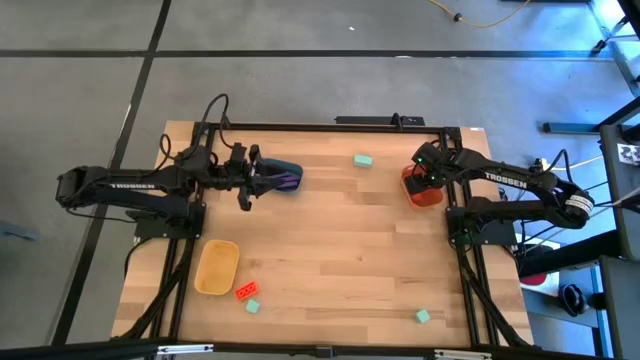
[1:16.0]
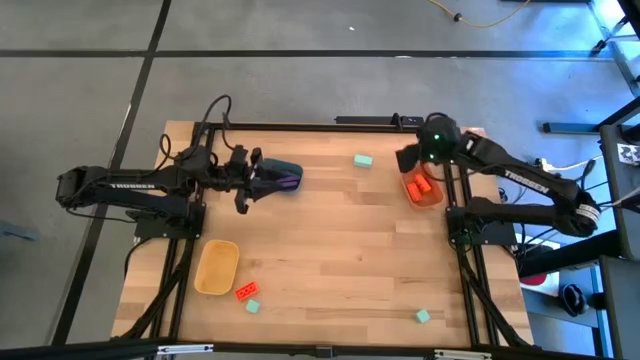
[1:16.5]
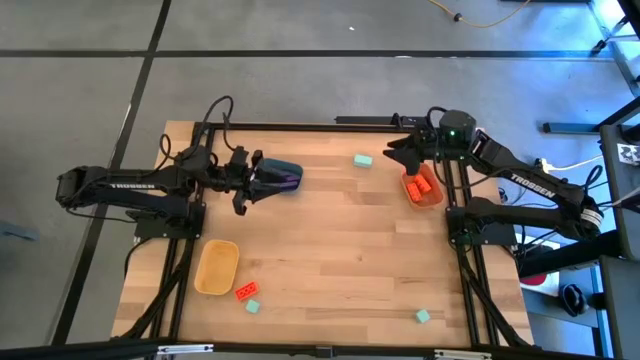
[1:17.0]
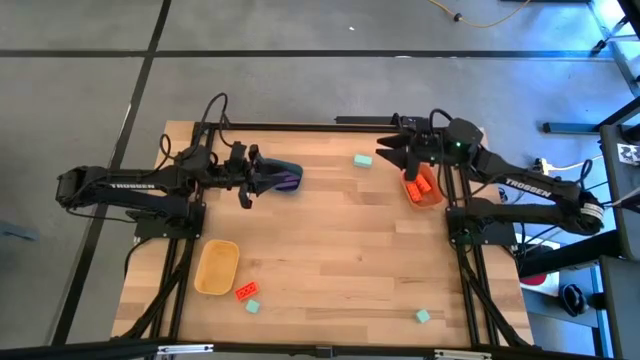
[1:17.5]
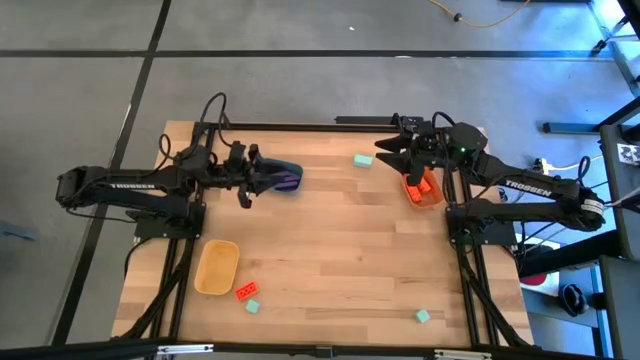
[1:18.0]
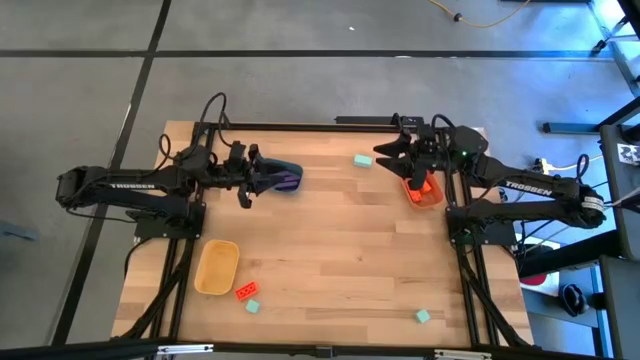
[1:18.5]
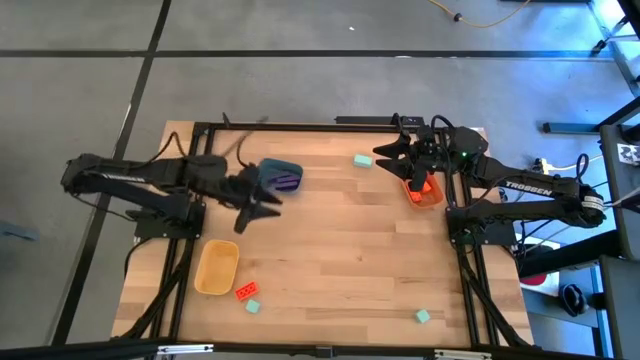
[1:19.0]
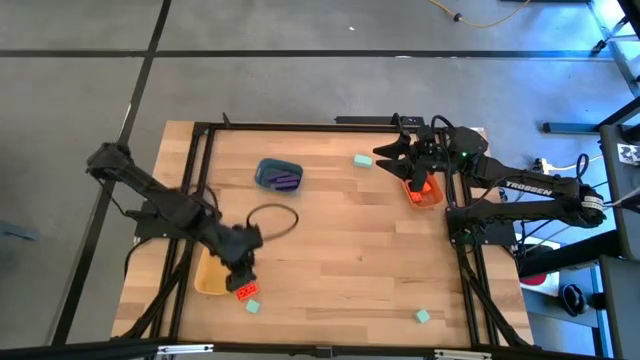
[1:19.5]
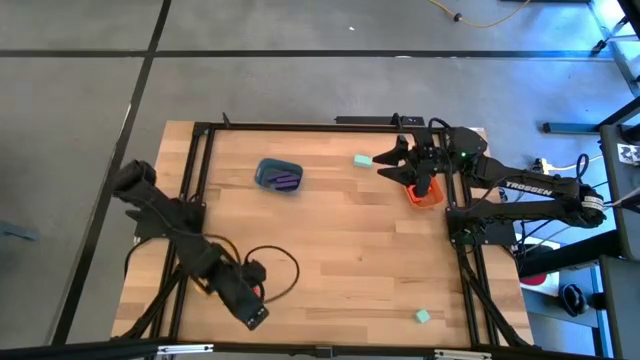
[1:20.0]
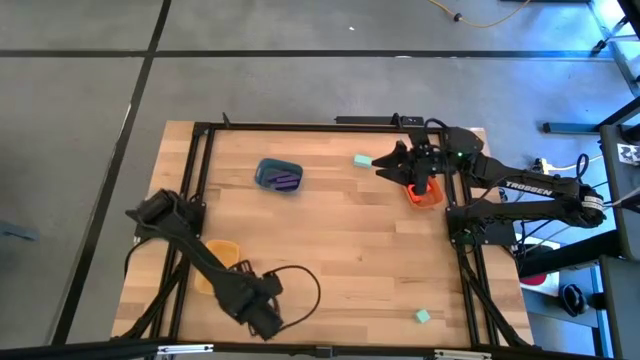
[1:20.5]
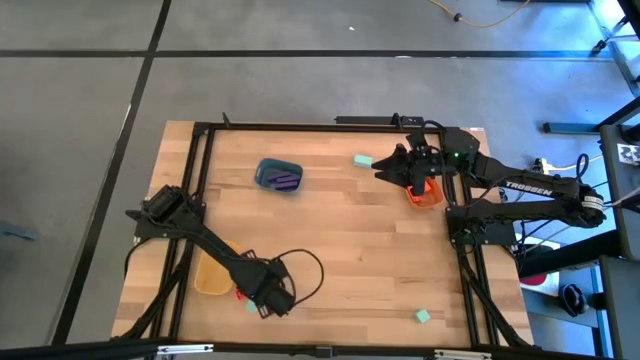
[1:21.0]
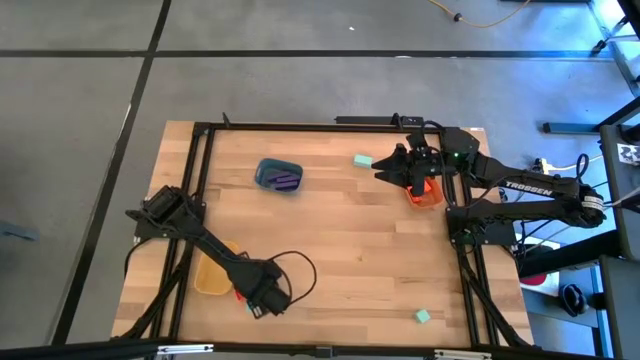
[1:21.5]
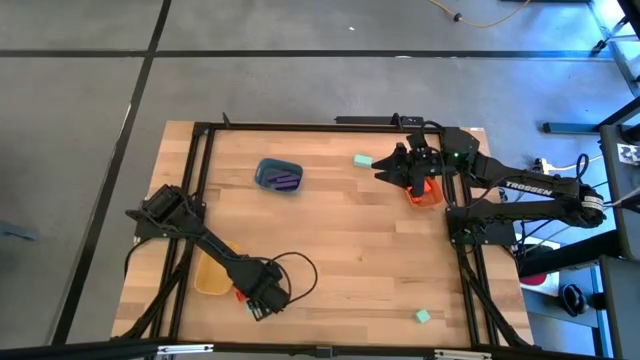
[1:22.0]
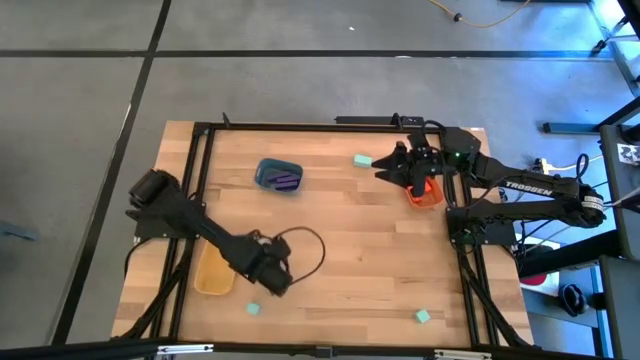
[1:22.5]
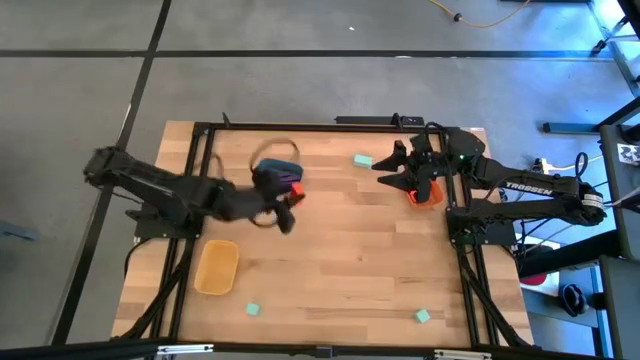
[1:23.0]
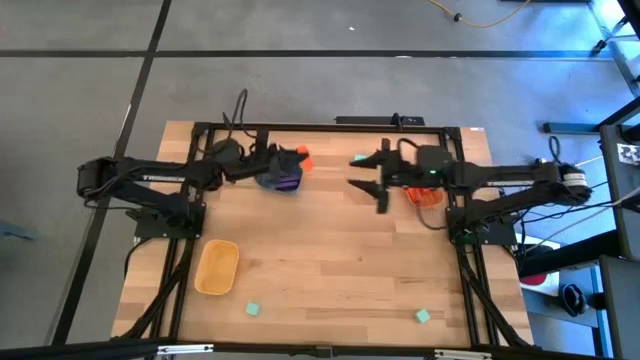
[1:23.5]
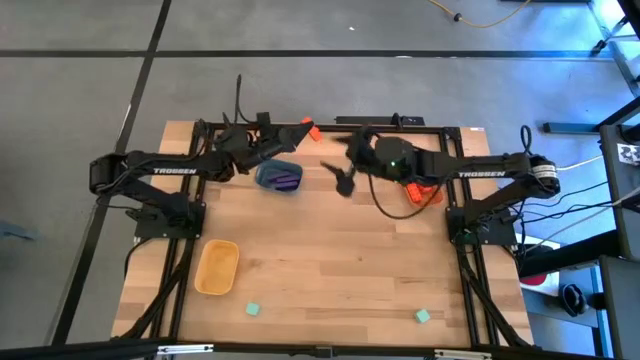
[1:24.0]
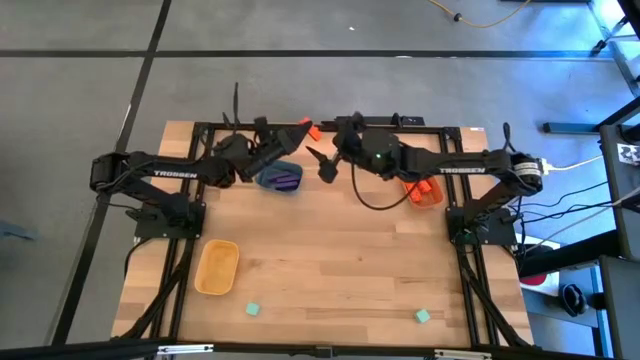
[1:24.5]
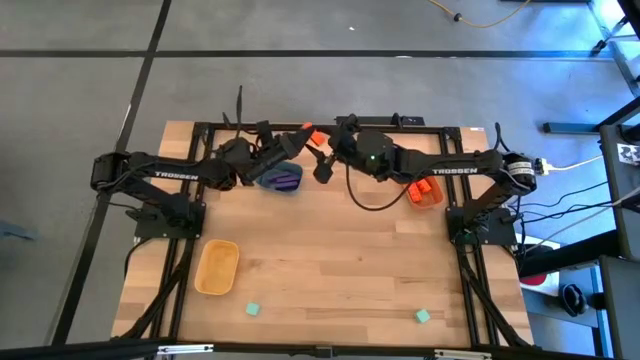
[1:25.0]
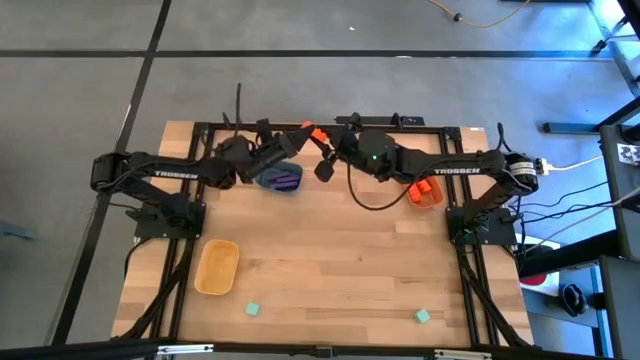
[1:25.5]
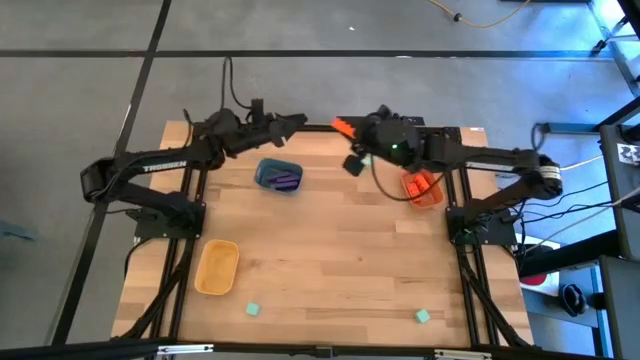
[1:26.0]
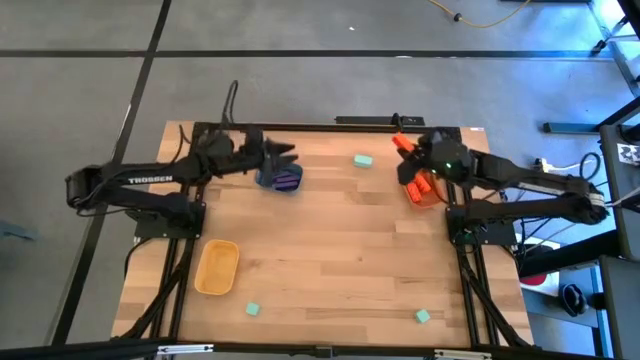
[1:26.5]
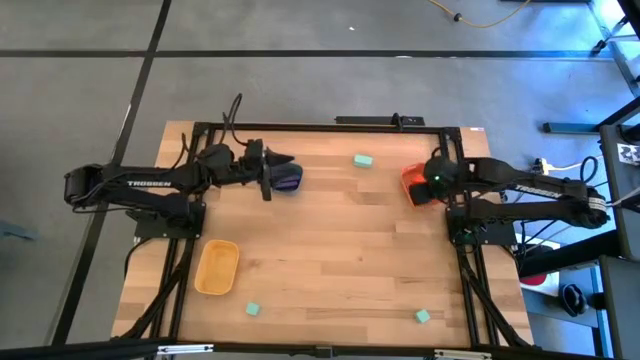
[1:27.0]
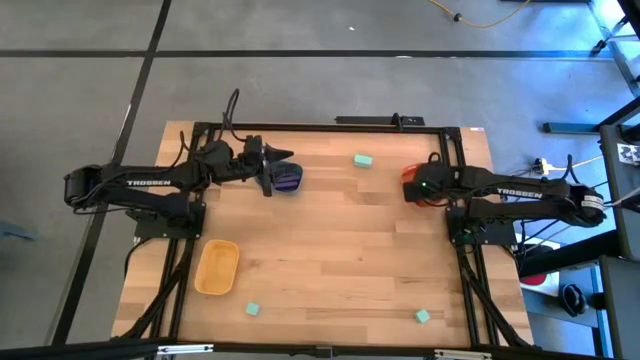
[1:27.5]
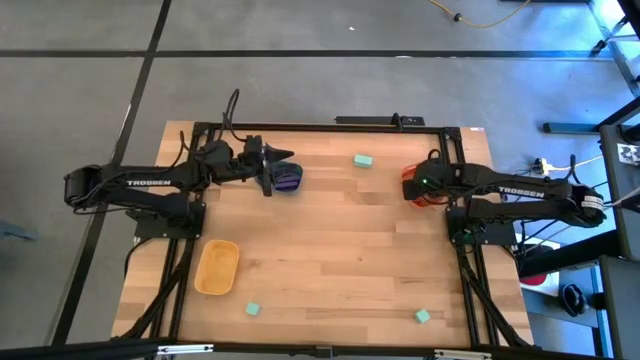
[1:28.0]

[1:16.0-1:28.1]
Task: Sort & place blocks by color
Put the orange 8 stud game piece into the orange bin
